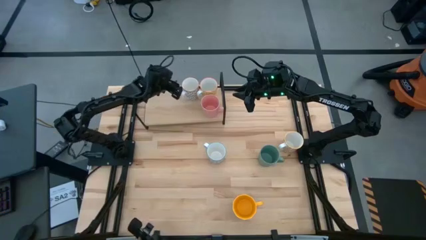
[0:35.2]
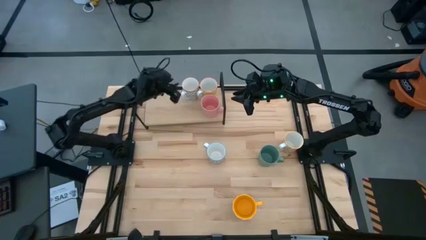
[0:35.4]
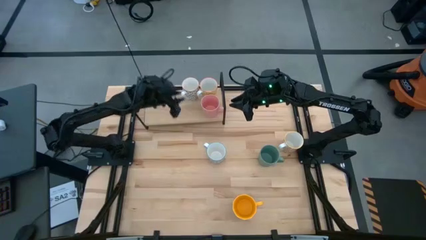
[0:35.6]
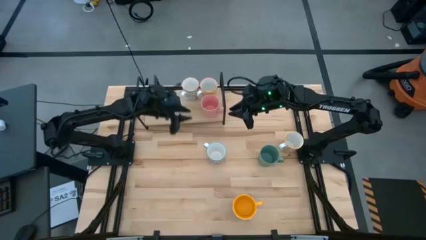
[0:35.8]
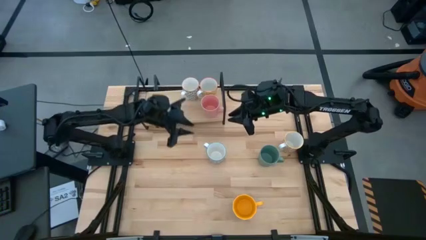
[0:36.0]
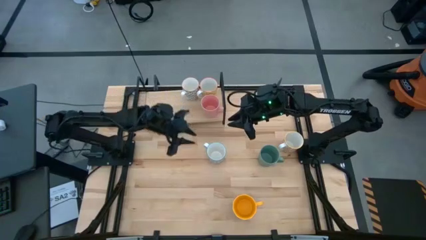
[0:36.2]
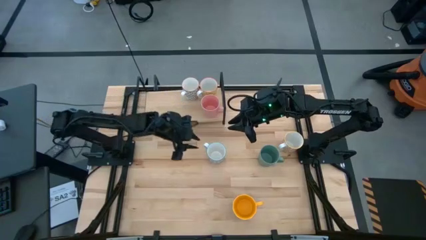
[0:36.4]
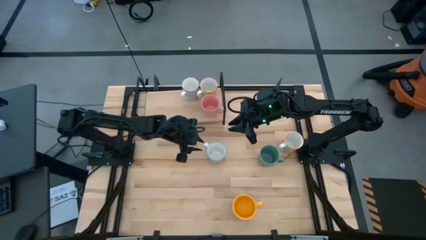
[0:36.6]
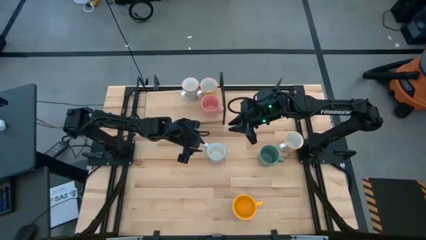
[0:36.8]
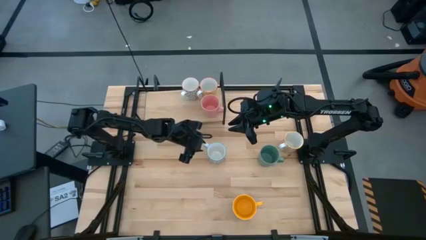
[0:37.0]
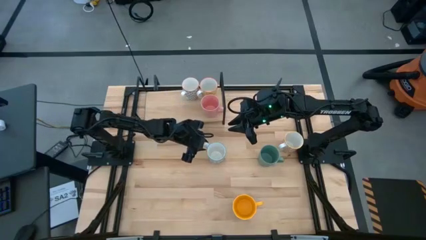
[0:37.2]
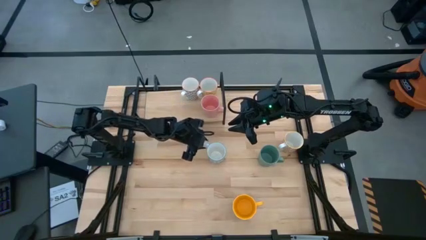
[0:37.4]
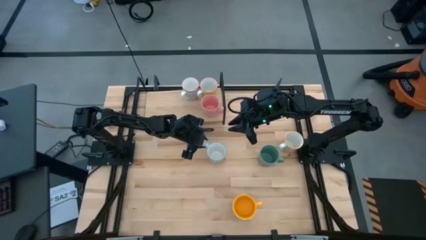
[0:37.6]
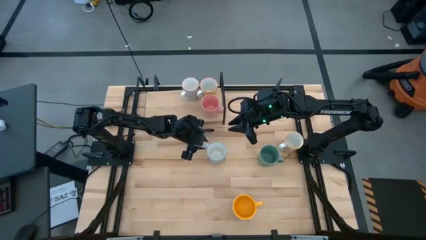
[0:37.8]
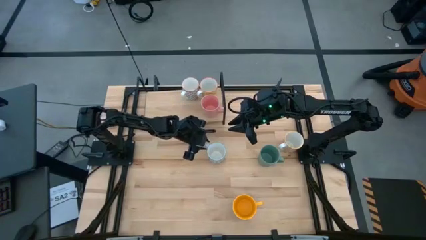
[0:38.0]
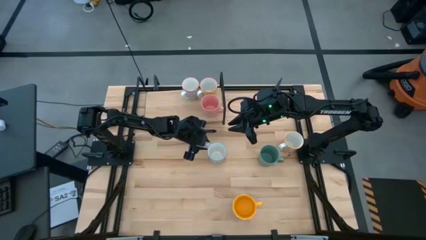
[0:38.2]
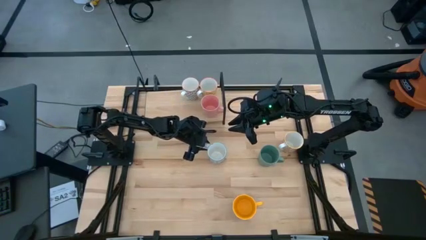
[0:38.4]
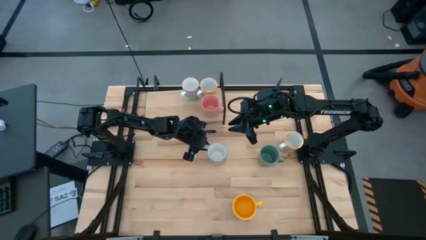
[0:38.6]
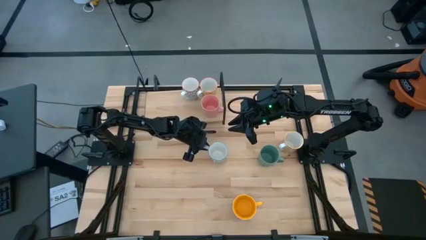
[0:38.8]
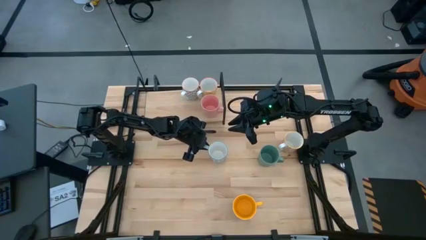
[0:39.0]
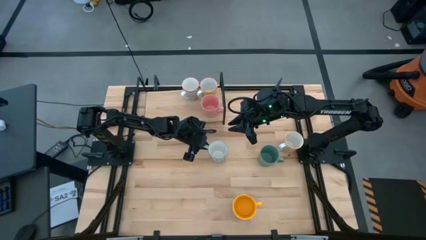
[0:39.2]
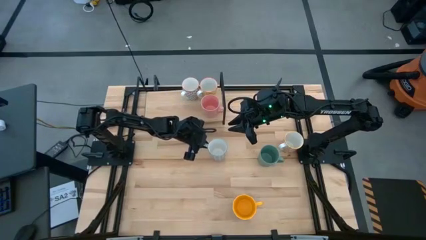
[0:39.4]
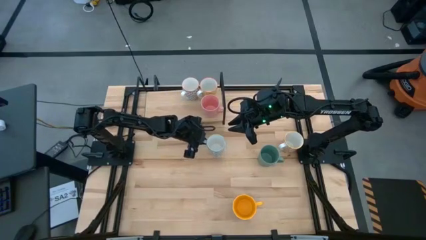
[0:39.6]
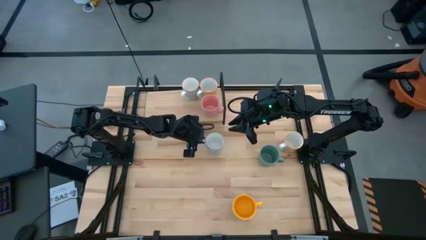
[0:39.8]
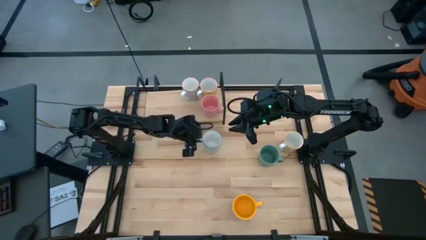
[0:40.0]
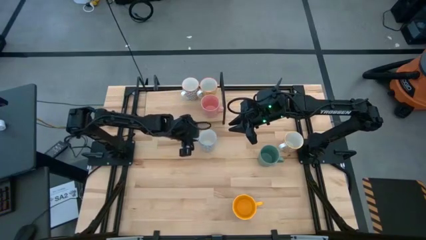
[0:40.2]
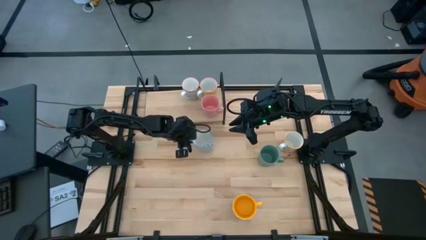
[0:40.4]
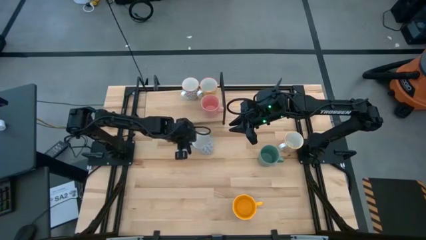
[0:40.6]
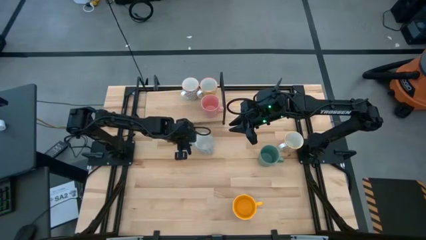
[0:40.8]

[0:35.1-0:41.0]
Task: Place coffee mugs
Put the blue patterned mug on the shelf

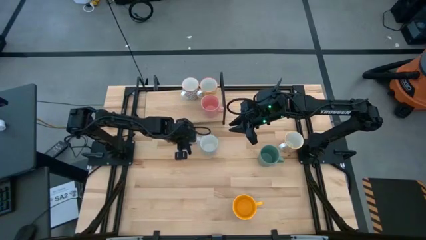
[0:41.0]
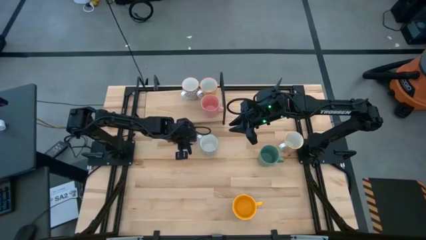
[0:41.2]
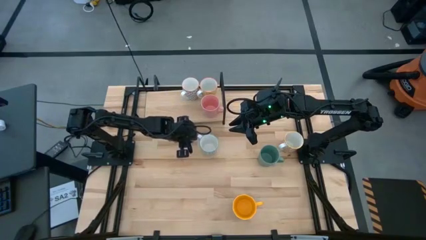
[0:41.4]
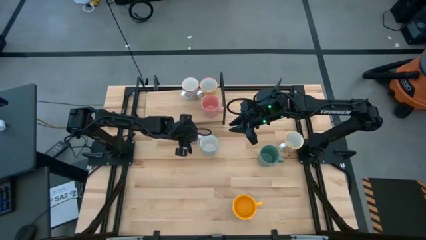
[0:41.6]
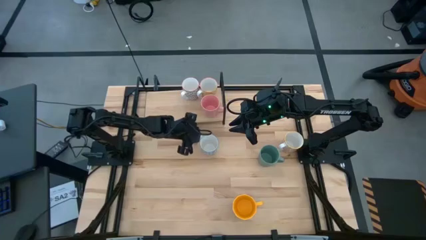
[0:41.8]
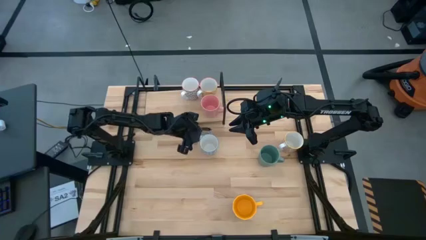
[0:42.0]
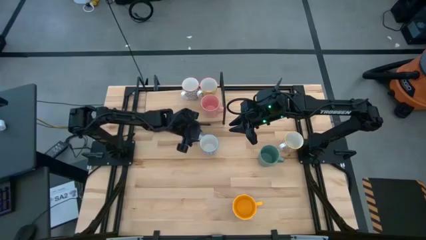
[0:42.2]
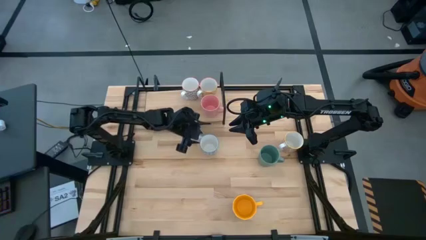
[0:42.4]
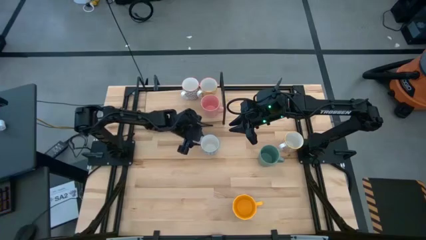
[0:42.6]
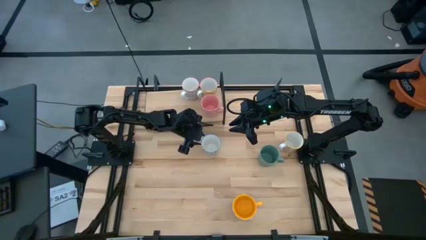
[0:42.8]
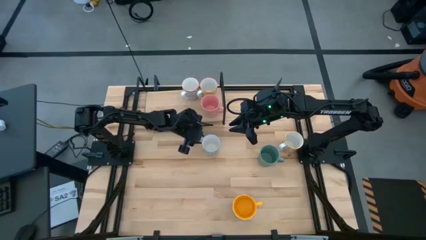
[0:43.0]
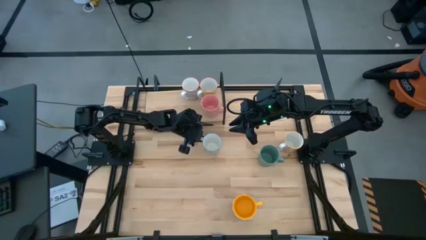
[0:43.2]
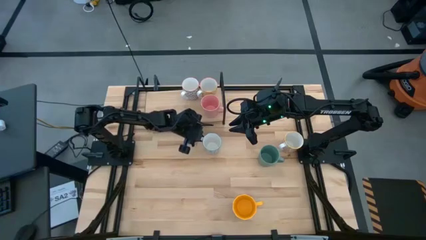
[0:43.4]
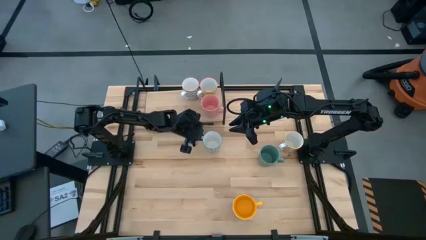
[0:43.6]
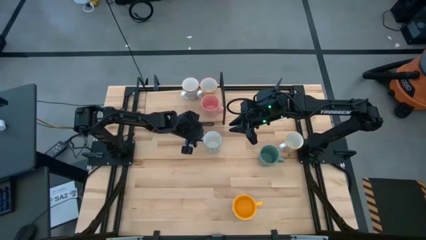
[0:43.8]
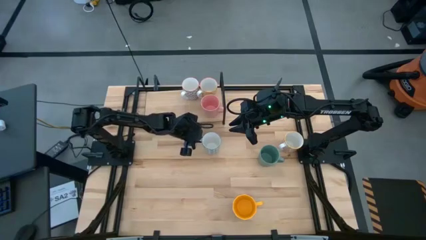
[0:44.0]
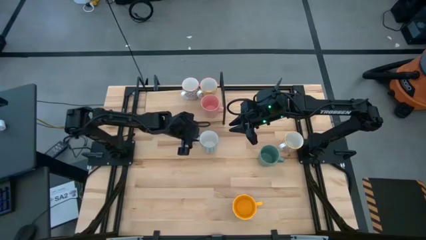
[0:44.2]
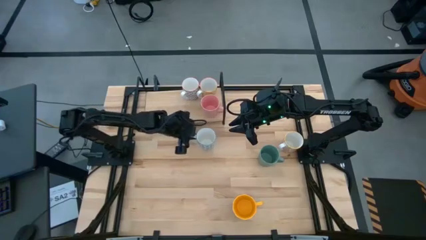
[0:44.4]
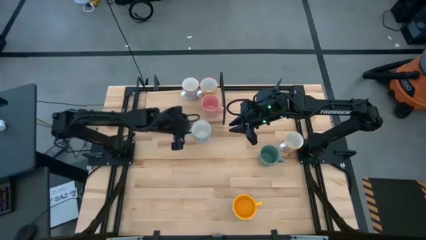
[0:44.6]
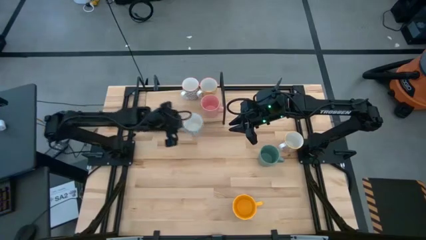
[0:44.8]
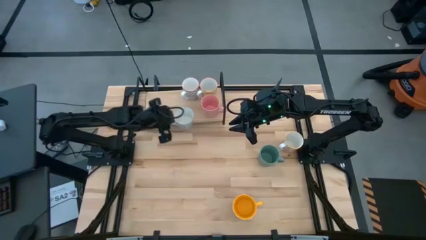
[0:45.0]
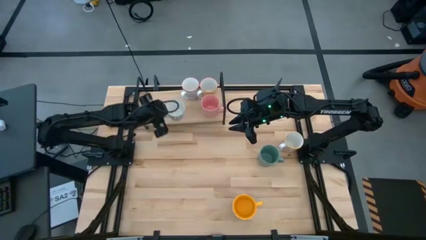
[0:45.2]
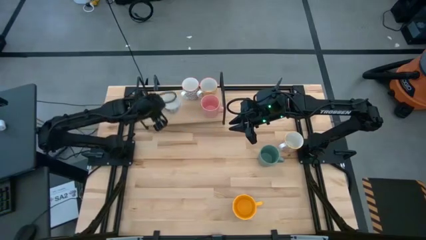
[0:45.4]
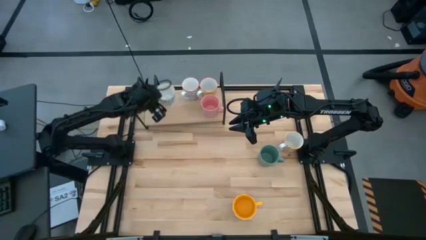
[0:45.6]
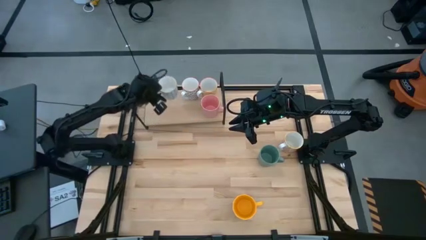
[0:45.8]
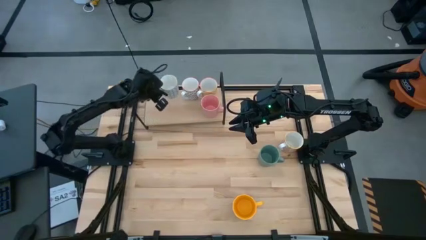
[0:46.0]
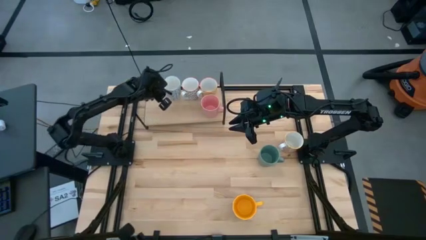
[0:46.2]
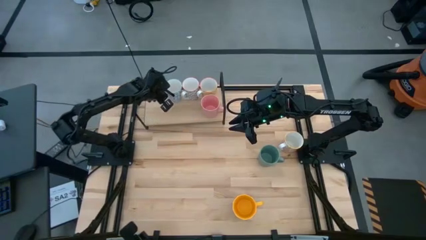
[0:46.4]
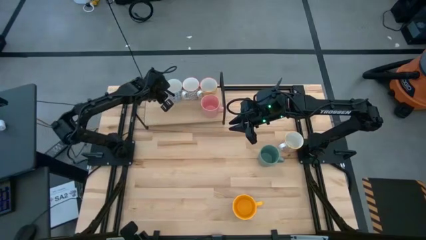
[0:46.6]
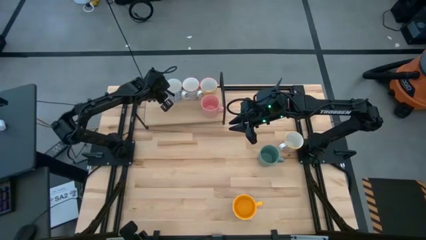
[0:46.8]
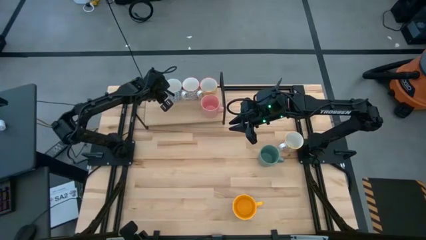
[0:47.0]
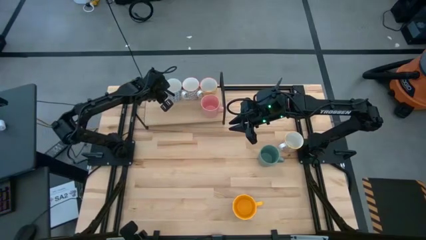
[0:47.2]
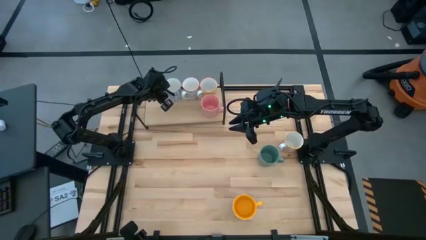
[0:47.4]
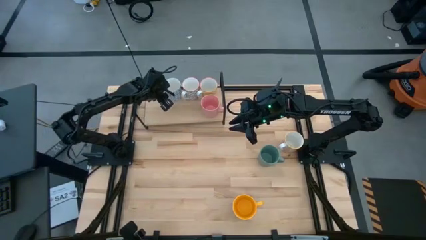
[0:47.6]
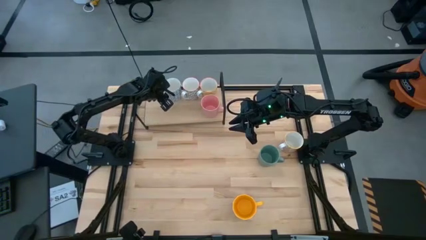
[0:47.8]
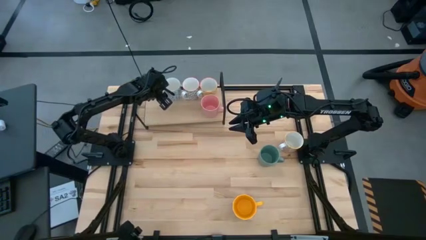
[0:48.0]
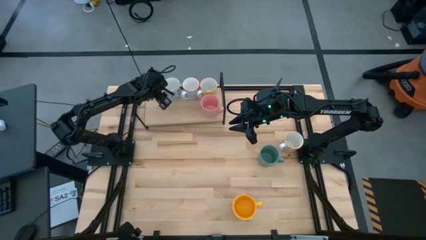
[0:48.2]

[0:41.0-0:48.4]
Put the blue patterned mug on the shelf
